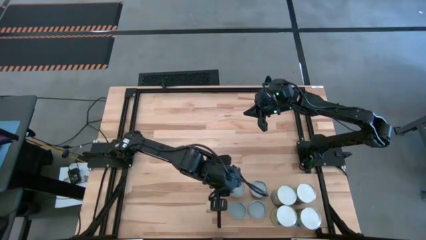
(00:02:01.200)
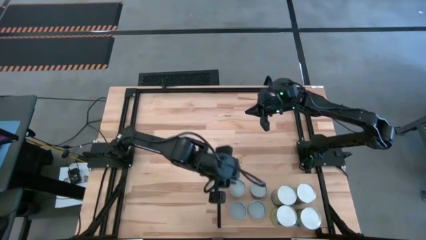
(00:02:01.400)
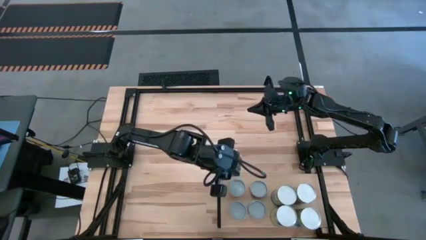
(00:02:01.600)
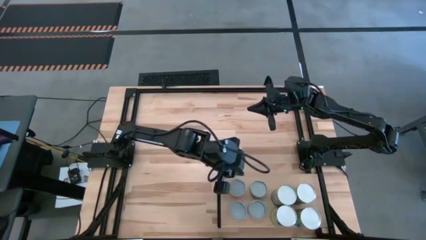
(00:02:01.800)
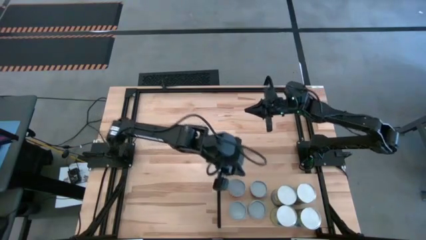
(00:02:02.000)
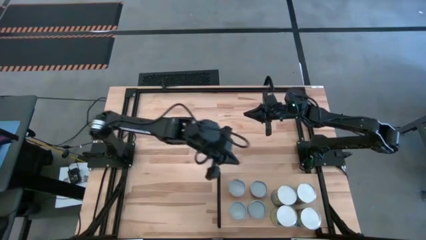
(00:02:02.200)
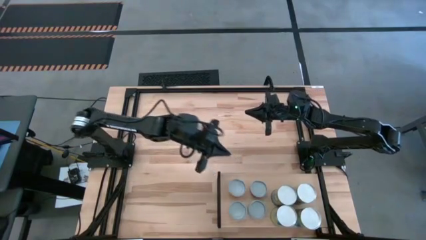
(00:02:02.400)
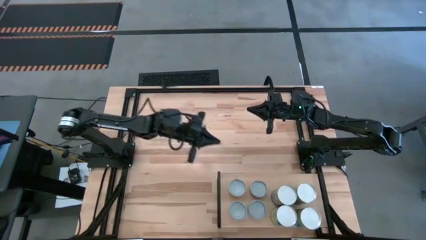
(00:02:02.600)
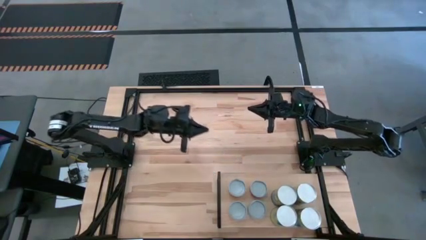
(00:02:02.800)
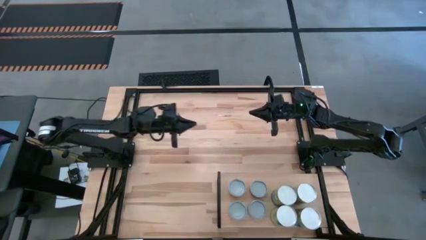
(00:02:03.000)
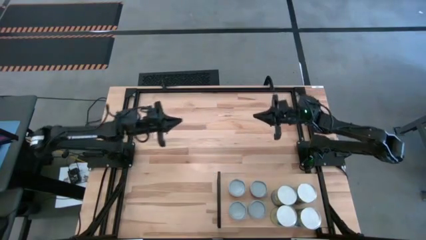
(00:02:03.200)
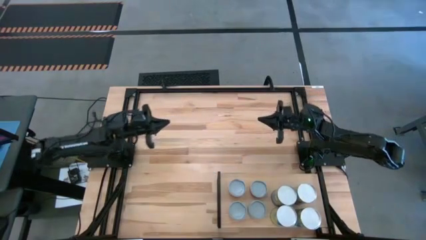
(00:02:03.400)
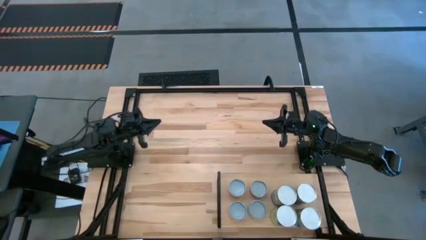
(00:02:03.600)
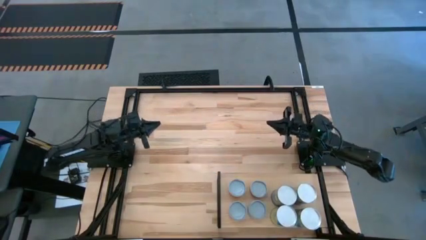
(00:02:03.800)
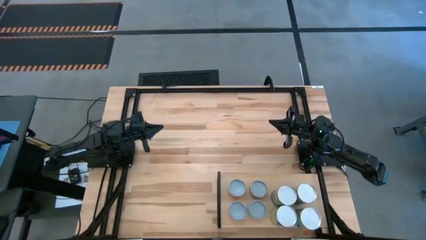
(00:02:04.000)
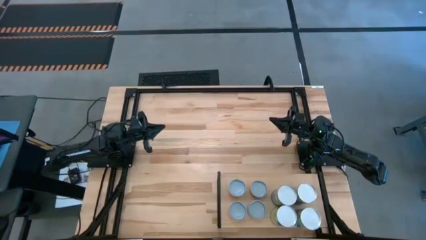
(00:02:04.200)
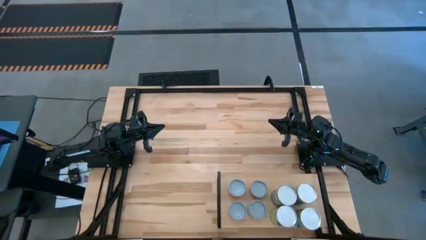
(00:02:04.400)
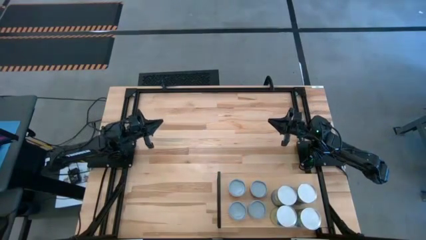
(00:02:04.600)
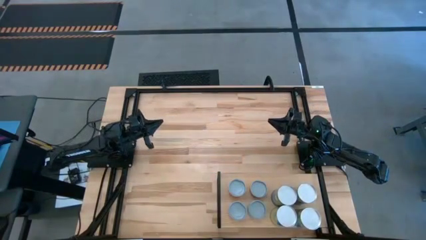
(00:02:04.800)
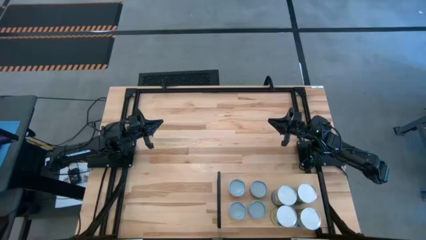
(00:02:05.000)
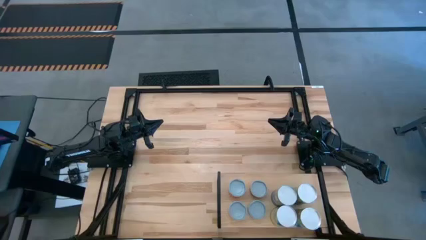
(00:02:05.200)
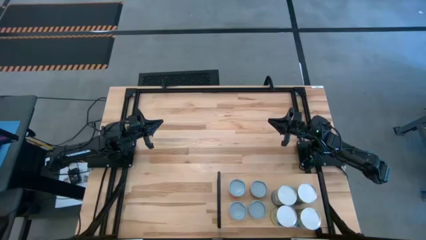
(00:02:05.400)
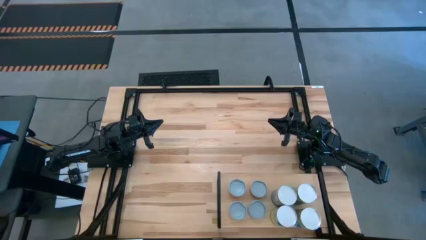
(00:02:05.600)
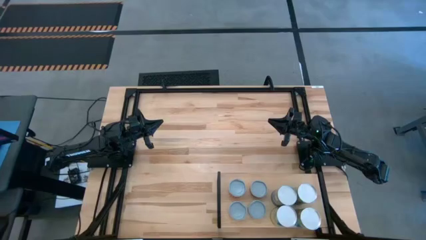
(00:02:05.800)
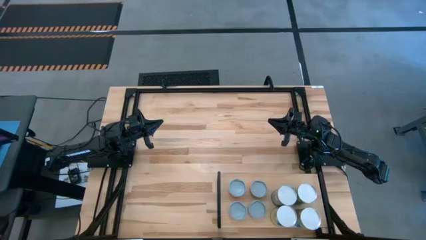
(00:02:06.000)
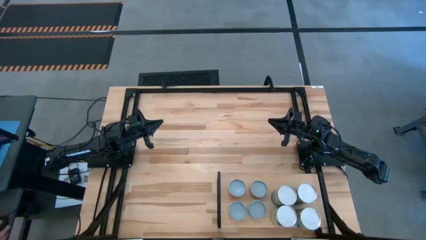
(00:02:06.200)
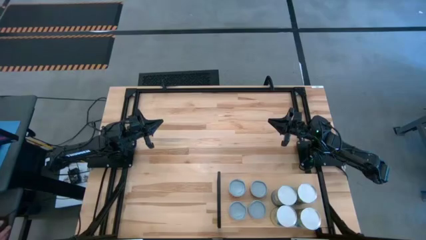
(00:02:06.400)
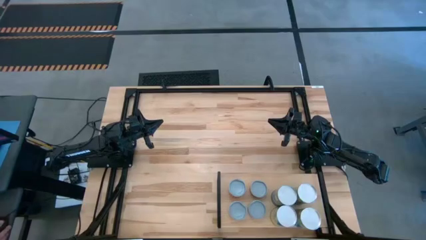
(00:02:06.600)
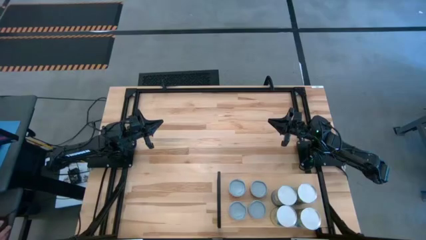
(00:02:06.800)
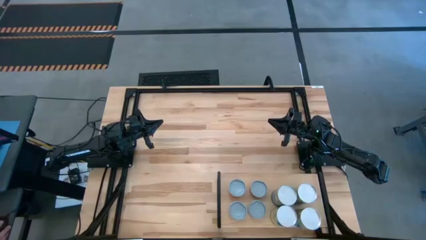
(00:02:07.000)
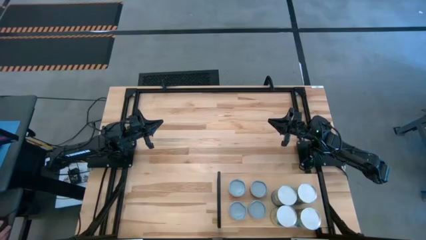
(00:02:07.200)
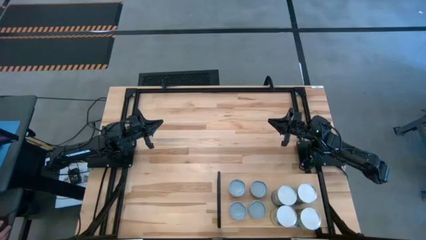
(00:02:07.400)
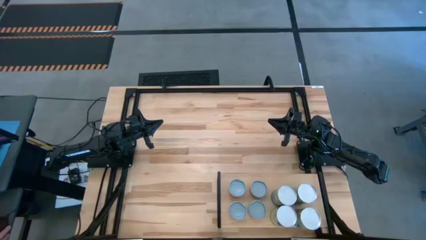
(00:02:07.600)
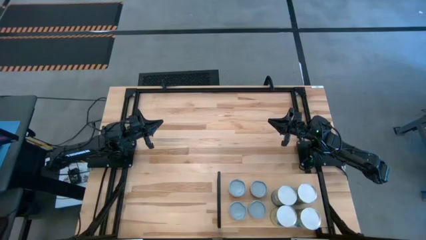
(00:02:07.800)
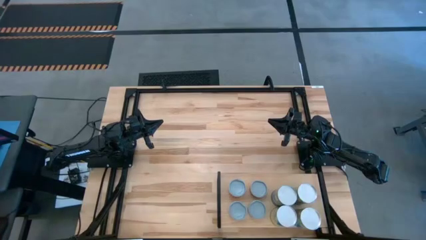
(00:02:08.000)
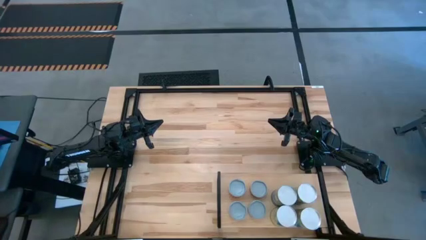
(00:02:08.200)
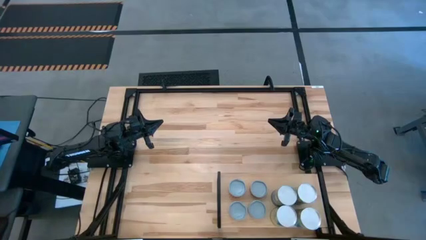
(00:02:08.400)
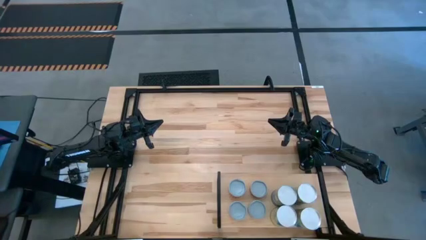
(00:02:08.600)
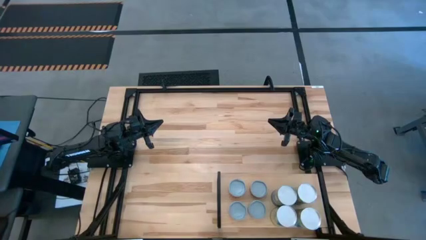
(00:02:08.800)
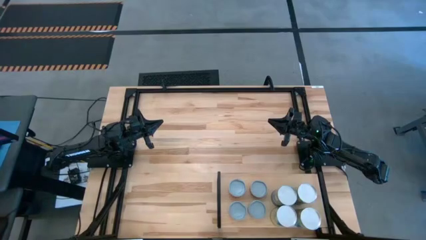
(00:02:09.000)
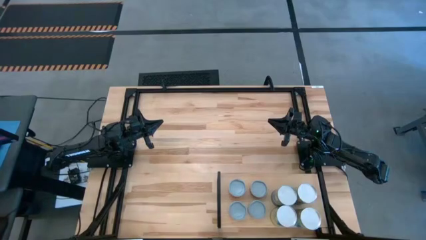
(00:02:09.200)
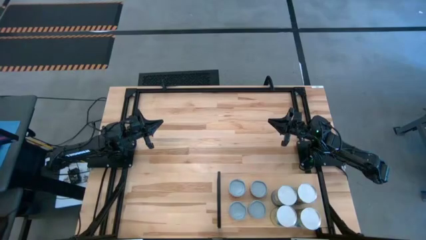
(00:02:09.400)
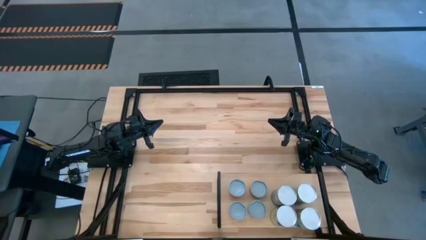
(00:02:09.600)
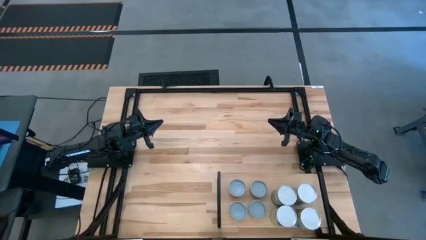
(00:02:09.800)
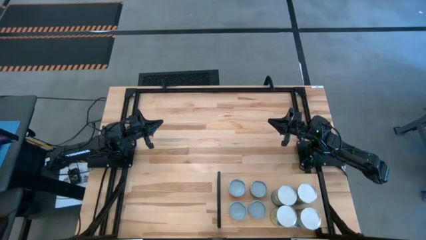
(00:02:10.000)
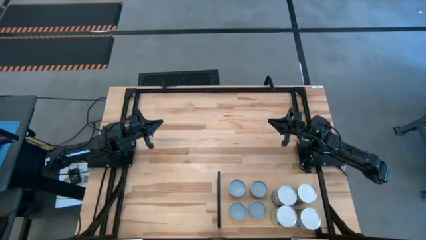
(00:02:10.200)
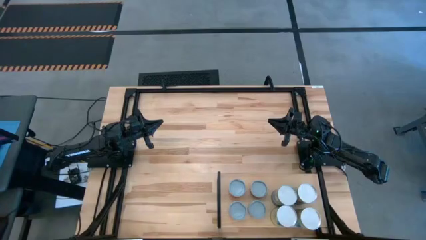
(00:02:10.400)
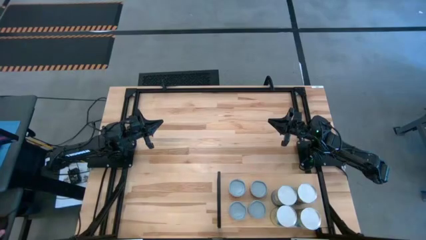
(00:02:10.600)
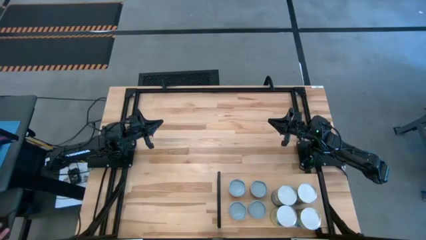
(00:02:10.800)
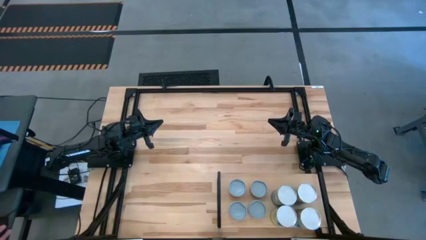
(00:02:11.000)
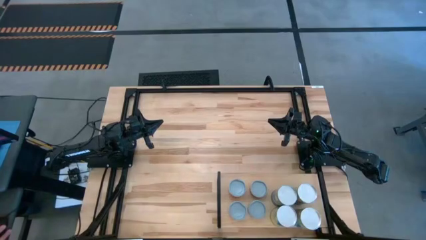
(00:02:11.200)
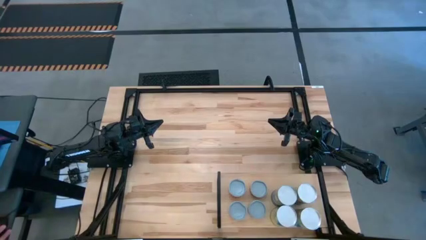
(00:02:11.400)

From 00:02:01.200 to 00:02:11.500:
Task: Pick and place cans onto a shelf
Return to Home Position

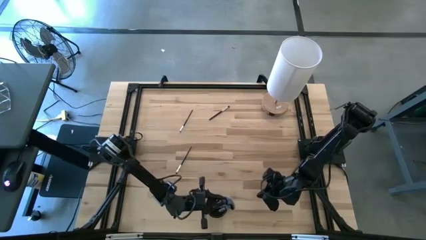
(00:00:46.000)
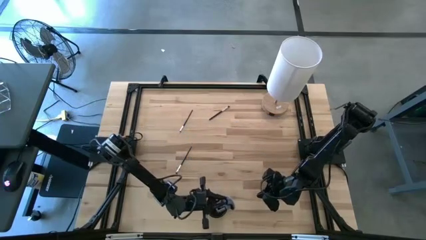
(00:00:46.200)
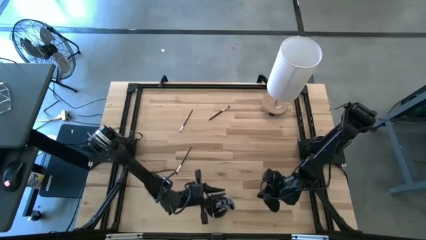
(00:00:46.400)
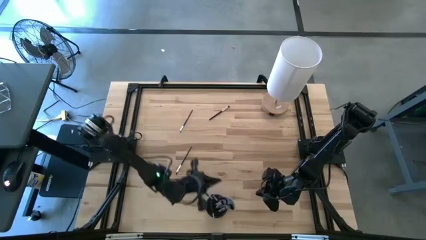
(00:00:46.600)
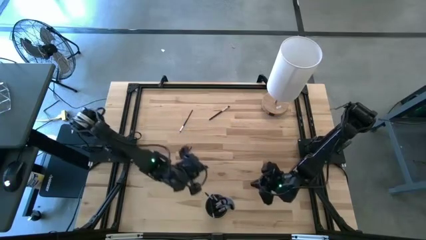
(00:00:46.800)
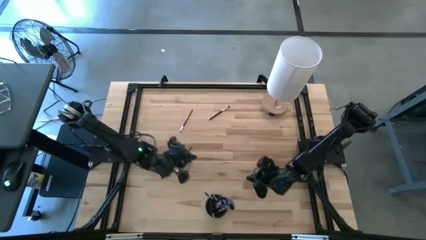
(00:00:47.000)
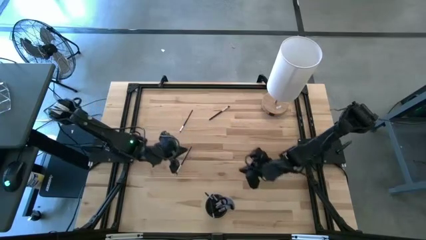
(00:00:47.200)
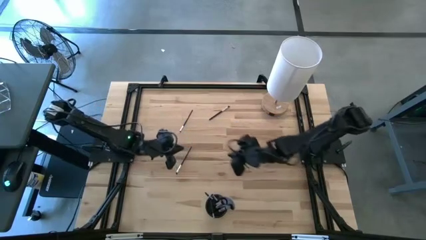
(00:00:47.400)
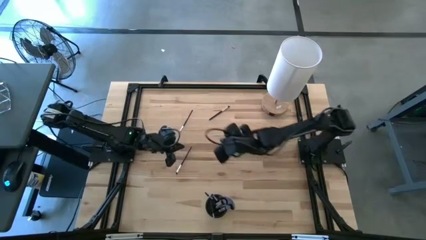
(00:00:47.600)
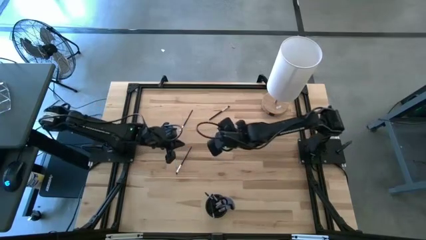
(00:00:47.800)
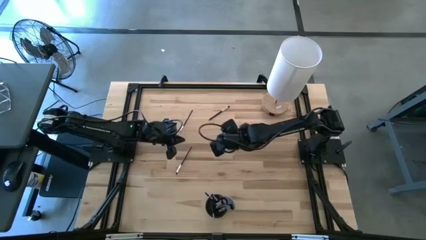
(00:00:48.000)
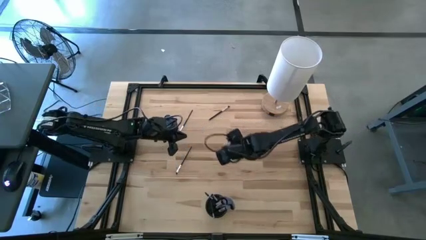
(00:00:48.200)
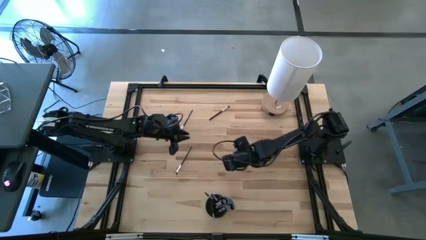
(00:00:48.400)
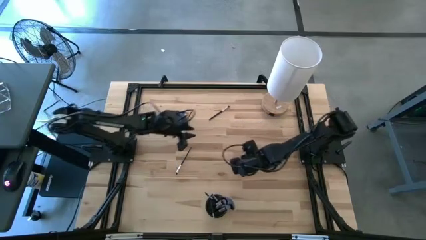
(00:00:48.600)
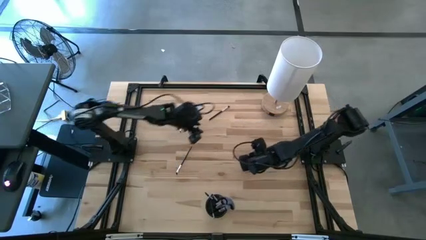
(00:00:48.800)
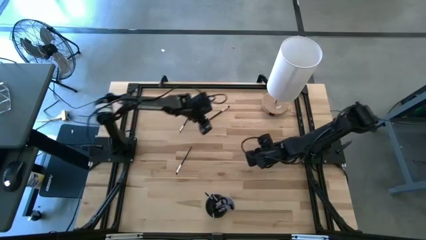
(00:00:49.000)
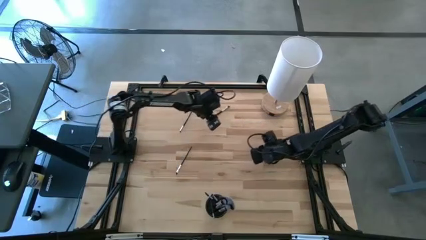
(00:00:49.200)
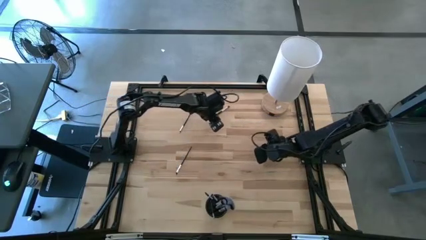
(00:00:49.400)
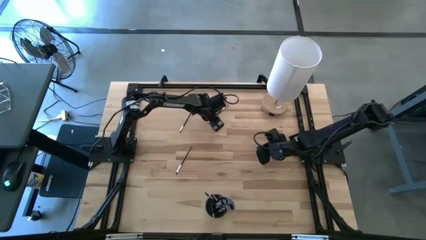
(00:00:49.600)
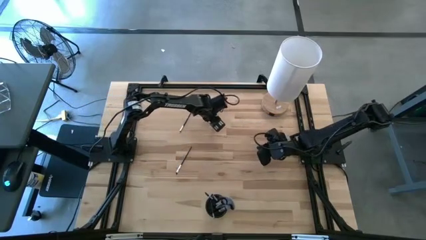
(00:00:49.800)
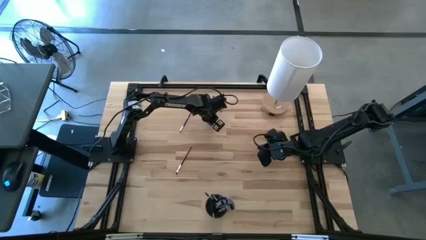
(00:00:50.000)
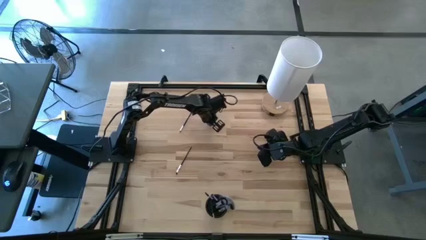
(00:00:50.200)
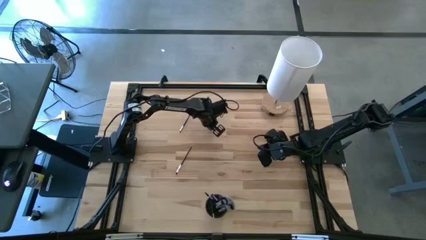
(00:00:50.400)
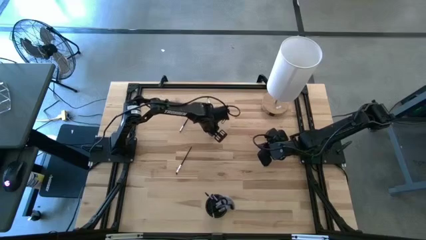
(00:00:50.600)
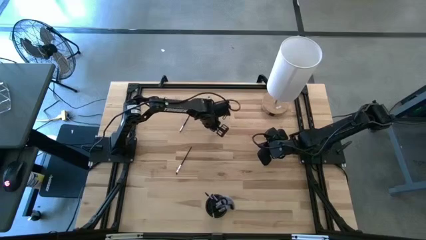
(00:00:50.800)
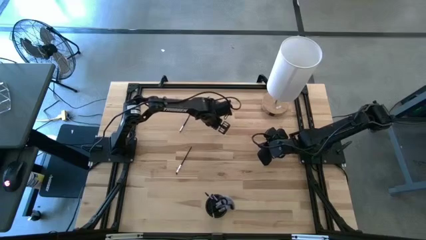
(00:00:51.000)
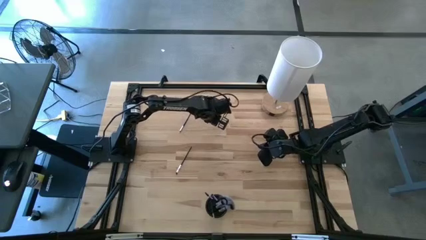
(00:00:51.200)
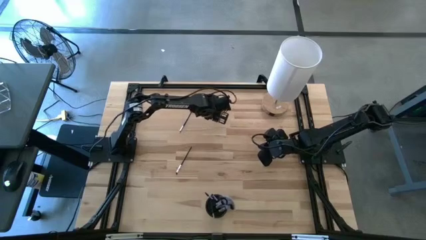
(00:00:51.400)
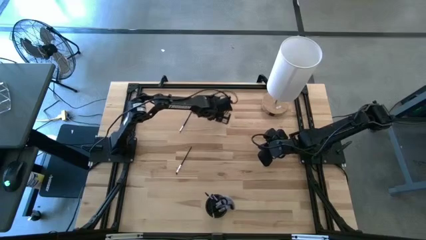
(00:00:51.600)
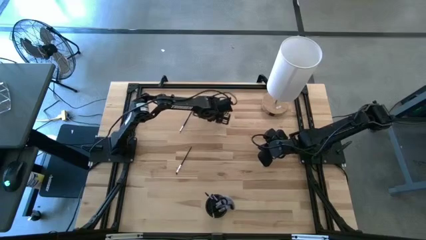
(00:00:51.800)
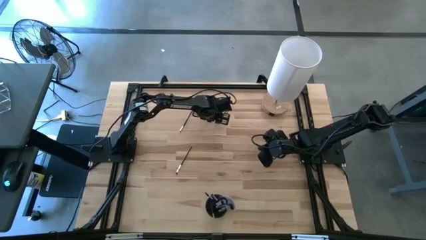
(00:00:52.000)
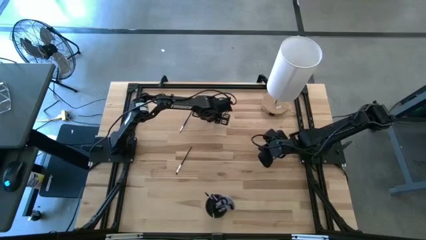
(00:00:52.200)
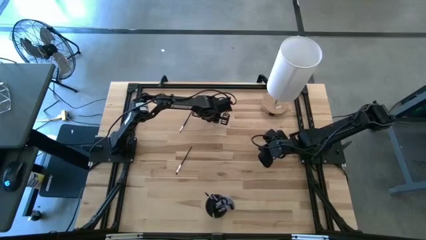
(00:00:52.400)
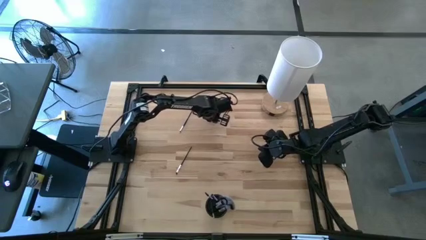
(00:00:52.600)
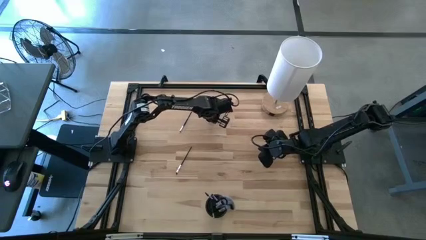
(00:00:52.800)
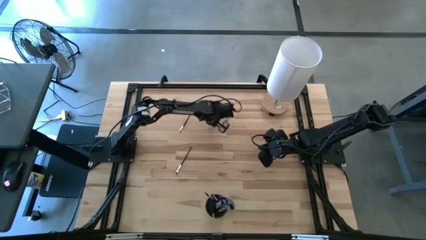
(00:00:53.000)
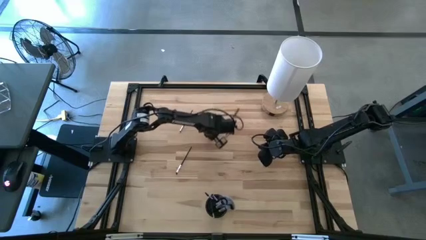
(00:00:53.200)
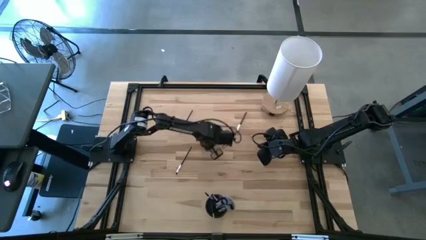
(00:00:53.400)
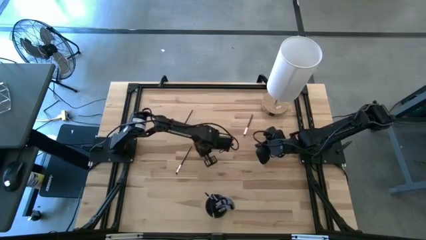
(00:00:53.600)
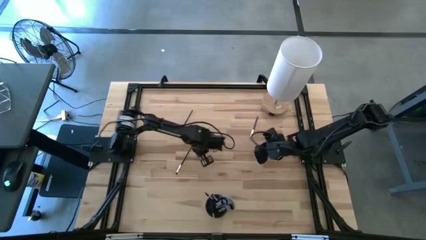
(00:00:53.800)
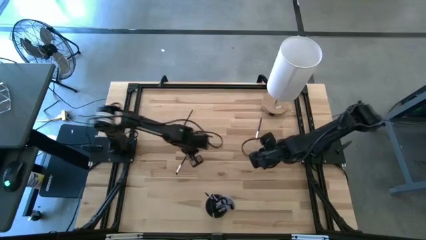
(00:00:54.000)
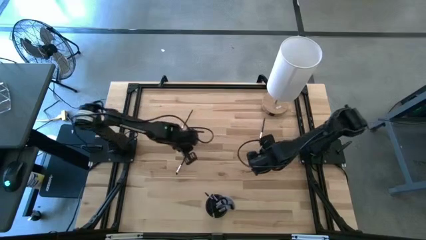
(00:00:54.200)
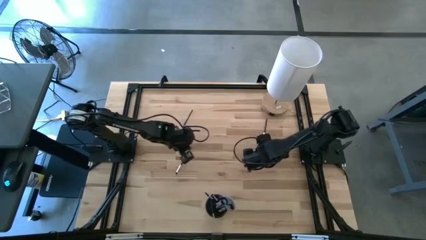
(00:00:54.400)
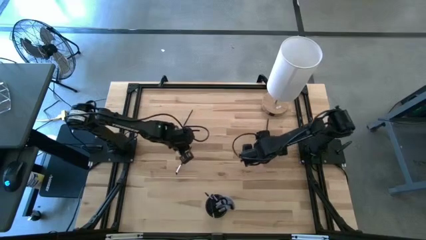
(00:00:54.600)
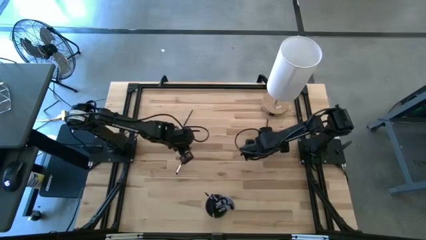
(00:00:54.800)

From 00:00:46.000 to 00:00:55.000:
Task: Put items in baskets/containers
Put the black eyeshadow brush into the black pen holder
